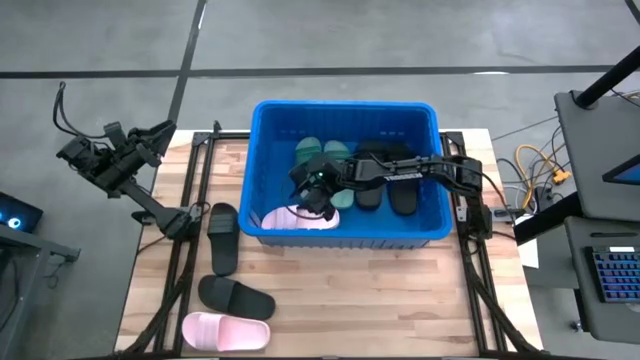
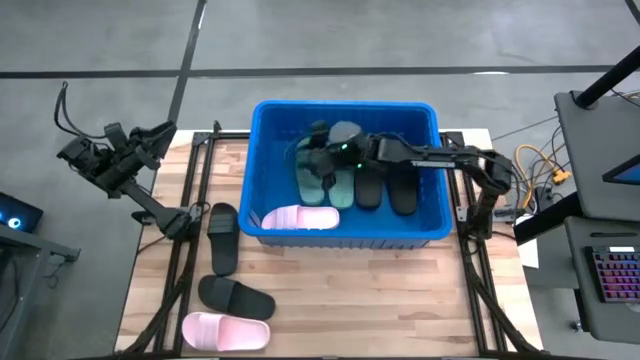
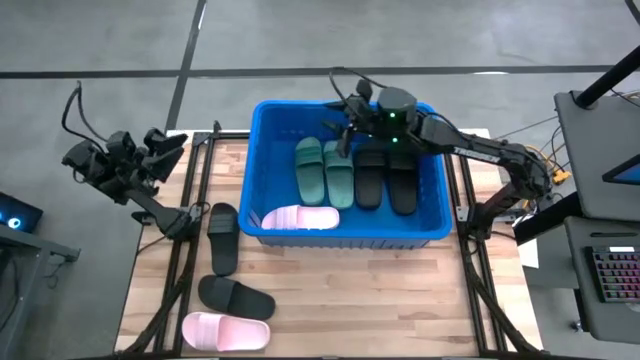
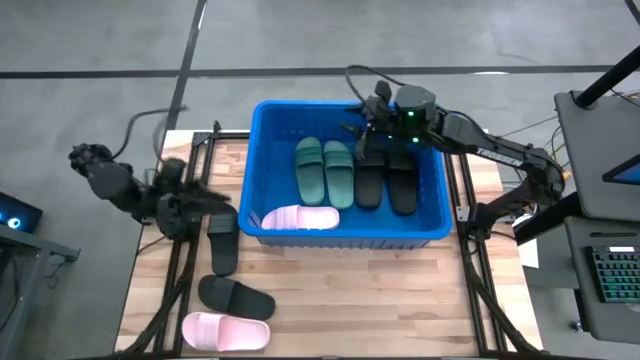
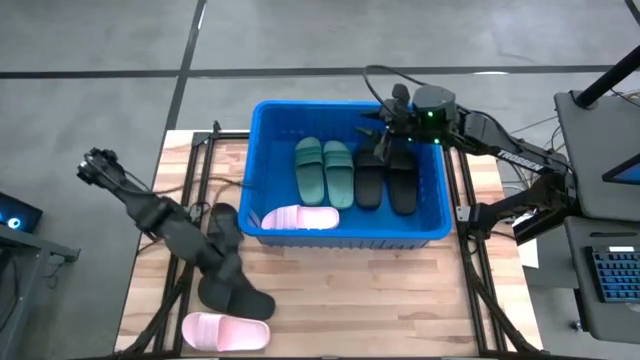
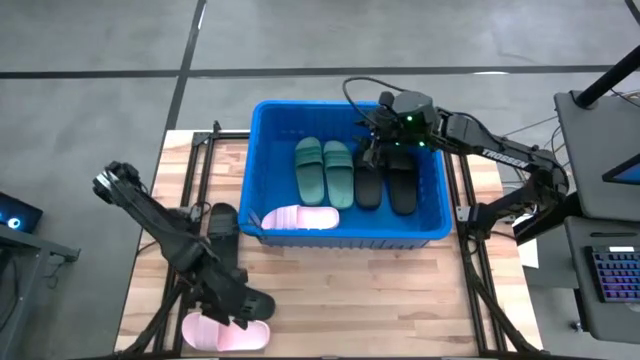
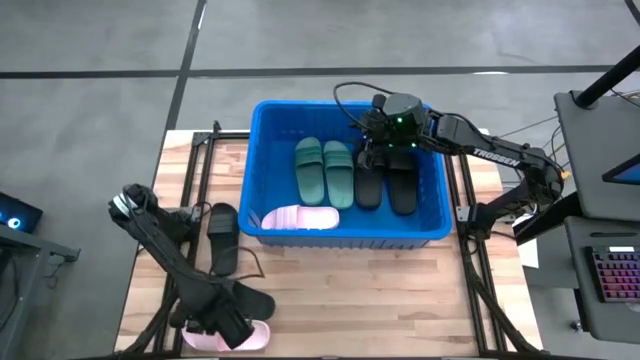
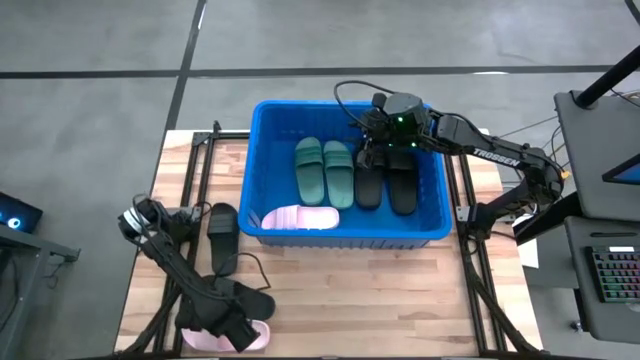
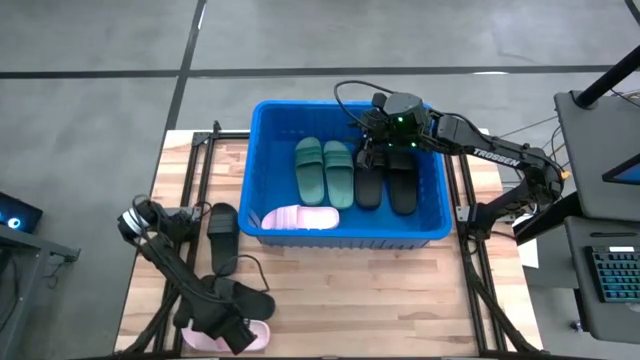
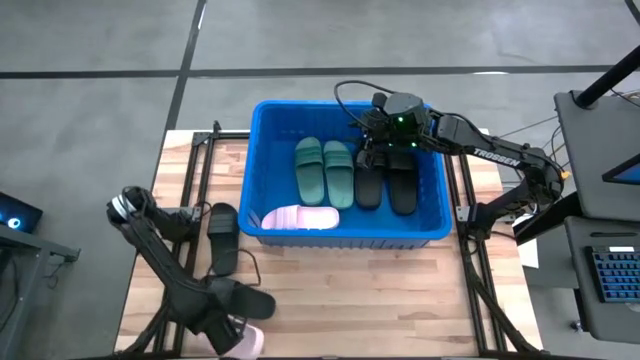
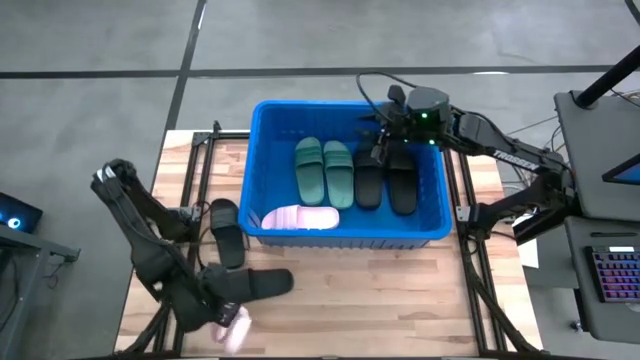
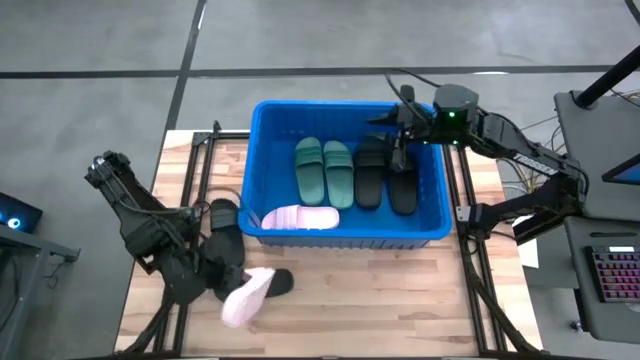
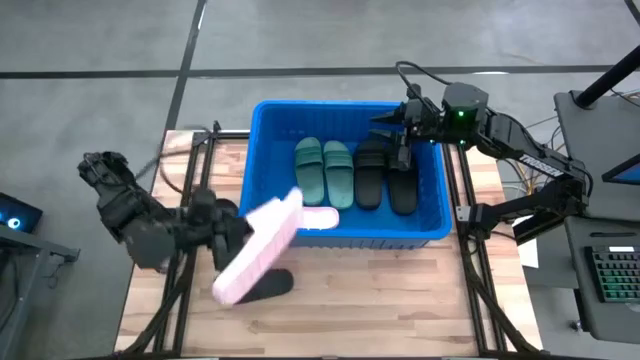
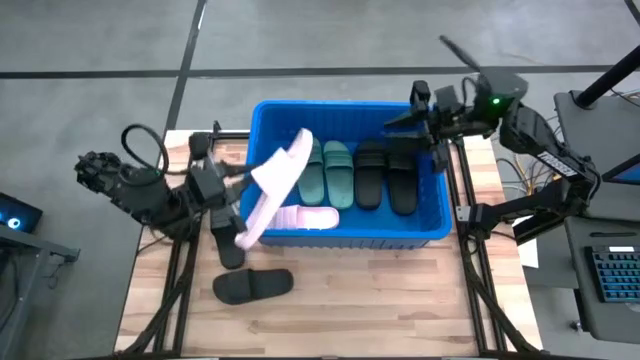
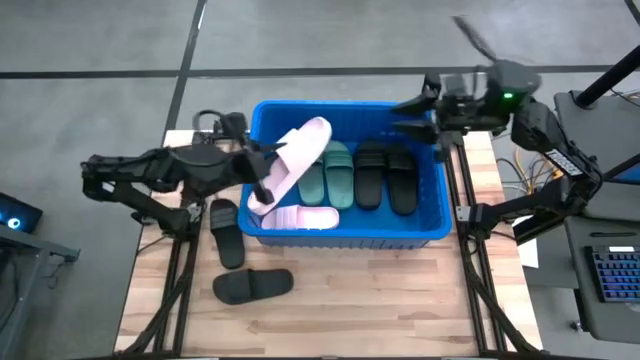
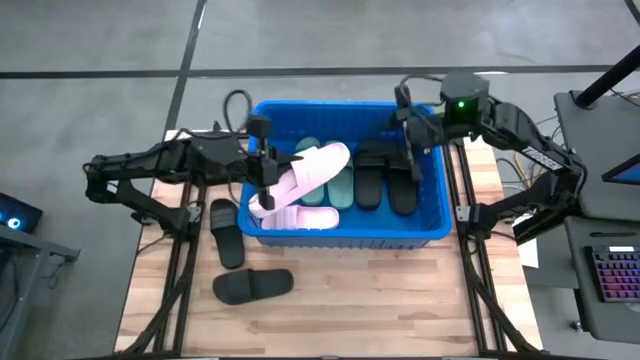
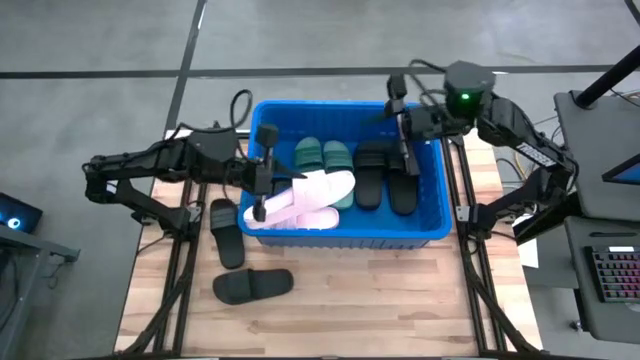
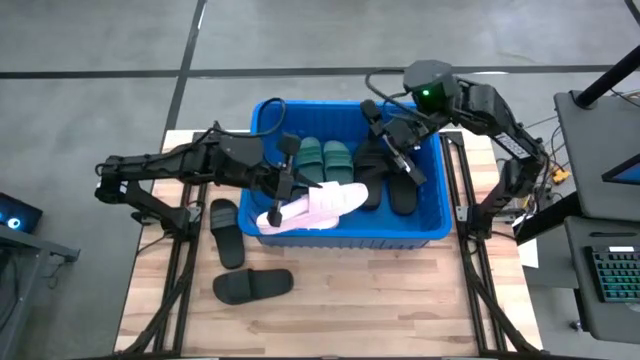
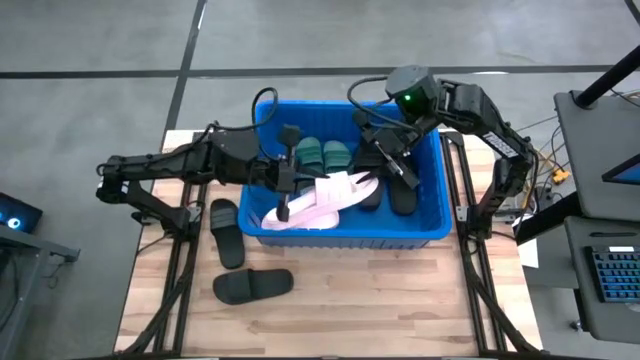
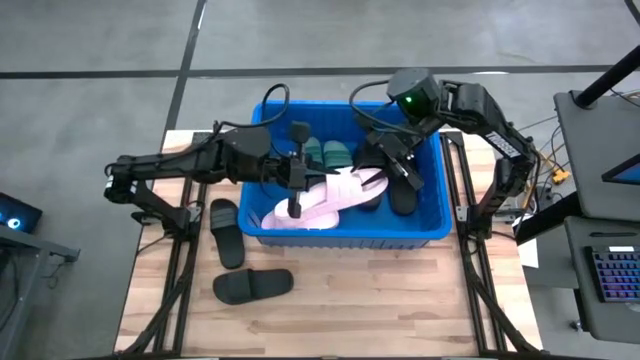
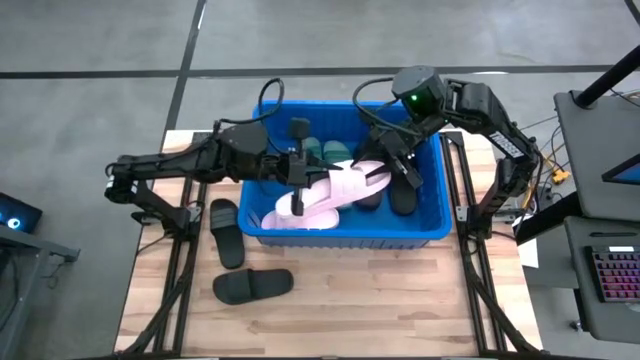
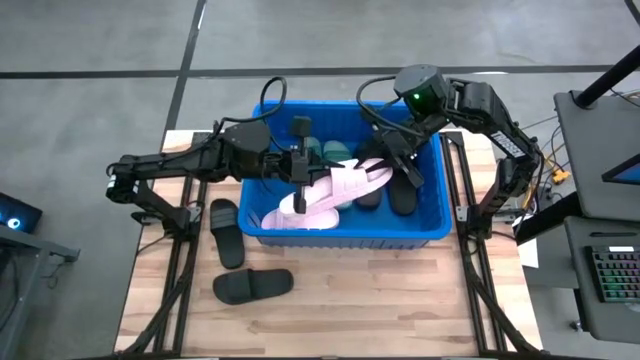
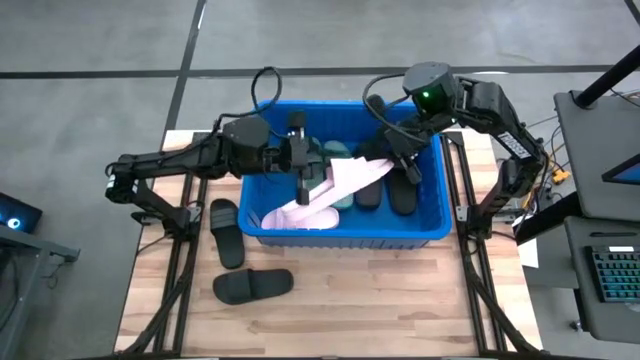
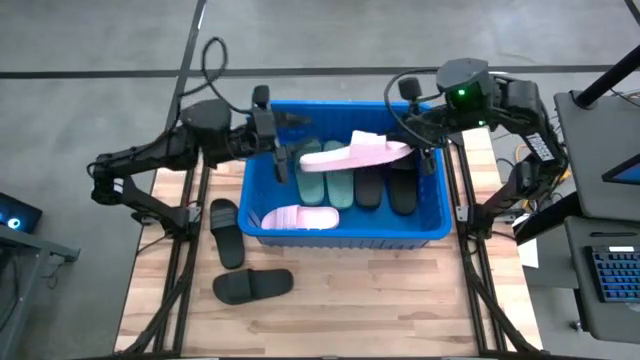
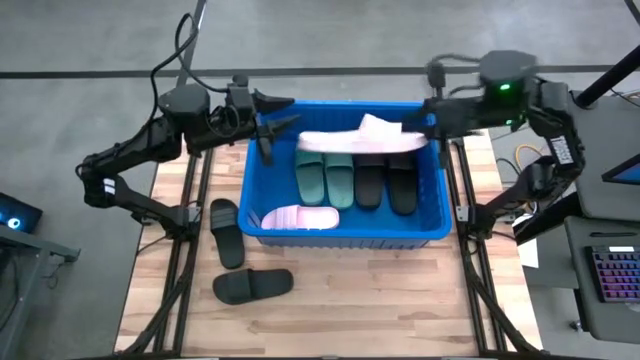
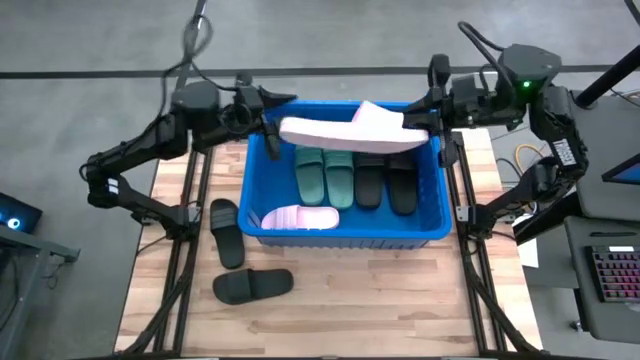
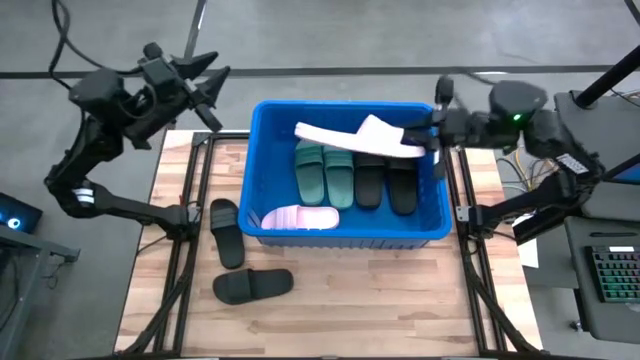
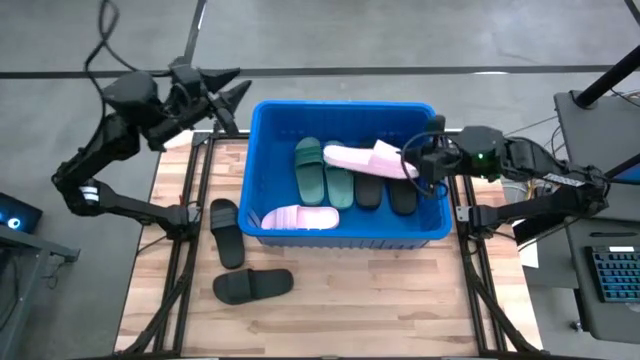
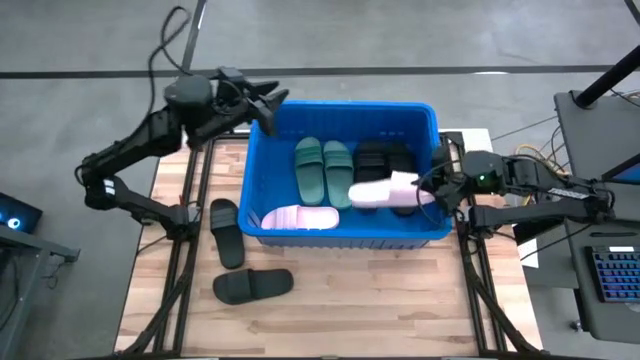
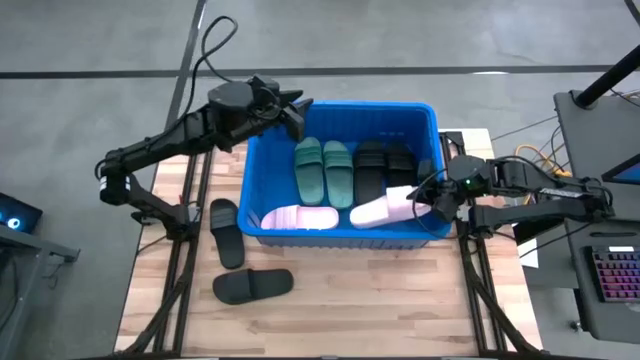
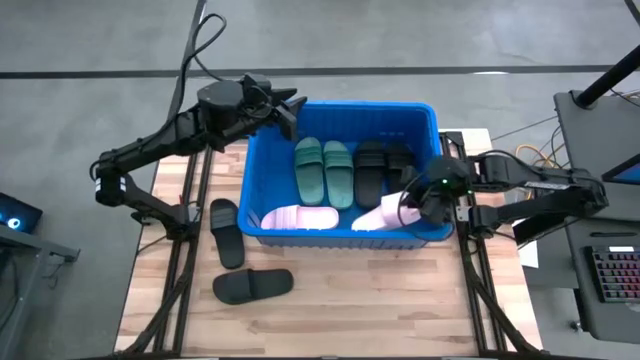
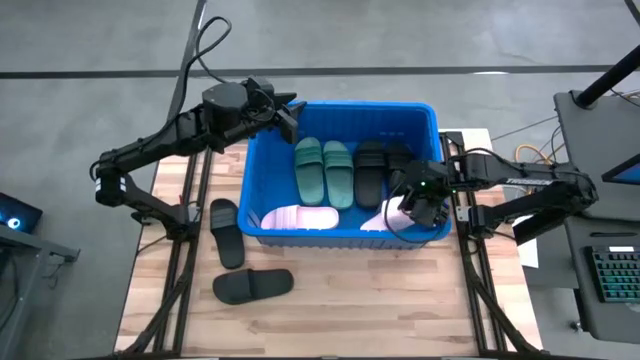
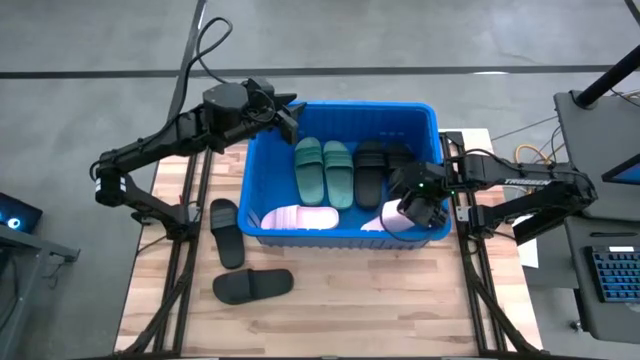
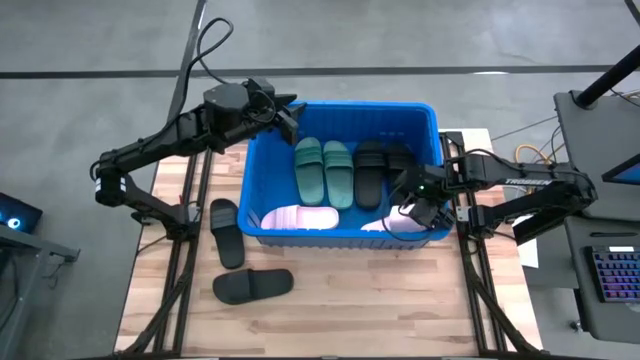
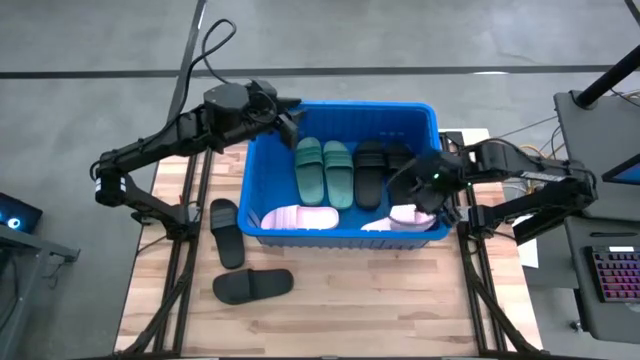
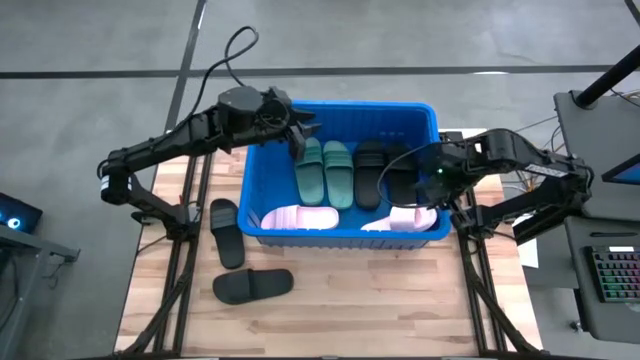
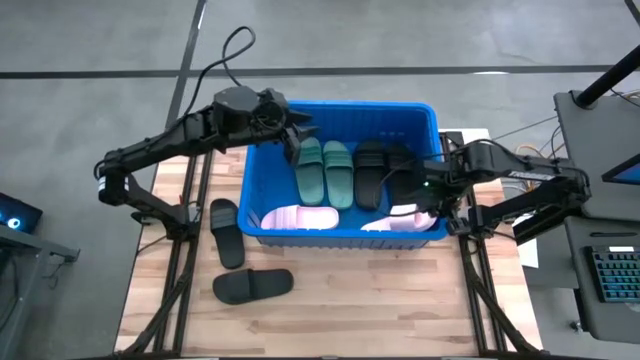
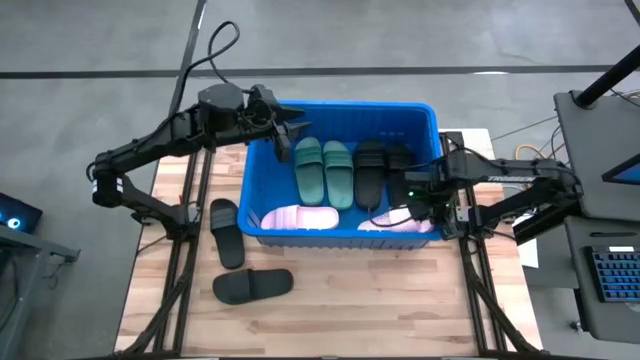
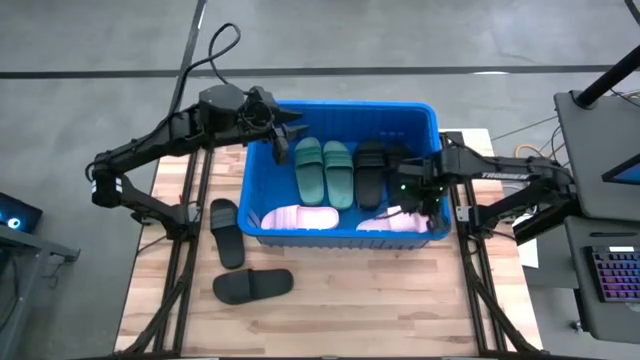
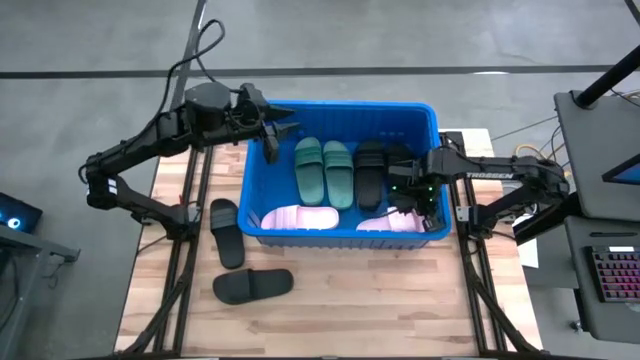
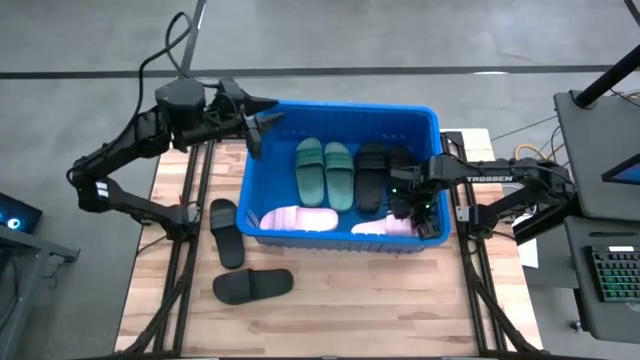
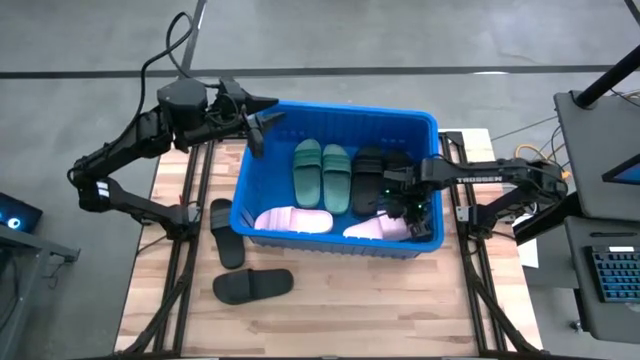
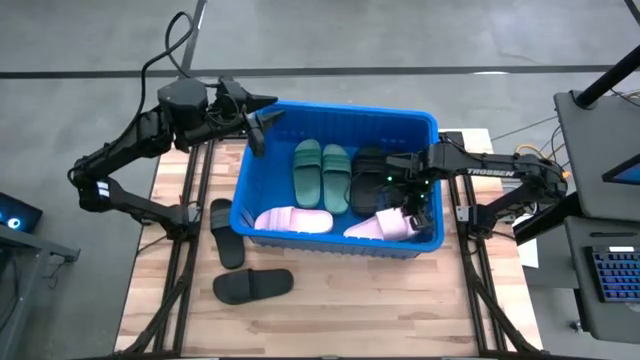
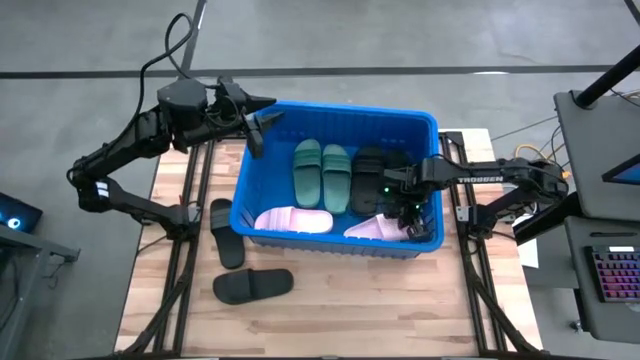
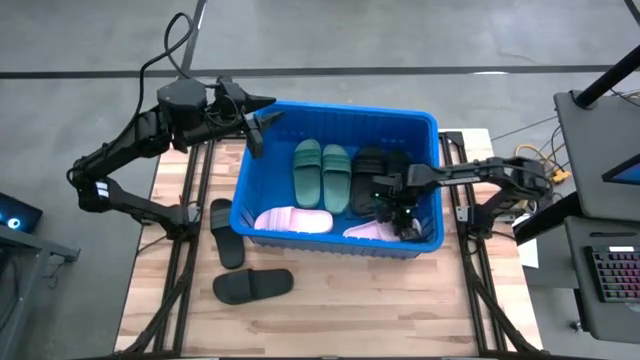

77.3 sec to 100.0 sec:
Task: Pick and place slides into bin
Put the pink slide into the blue container
